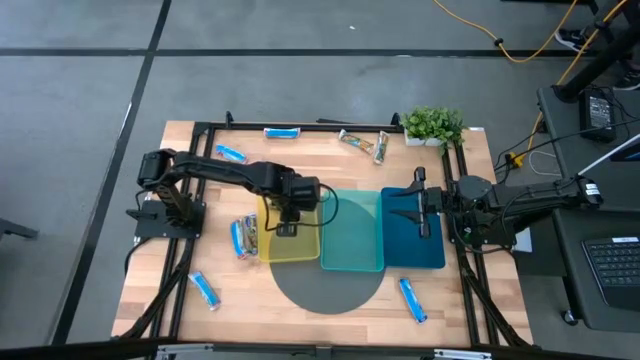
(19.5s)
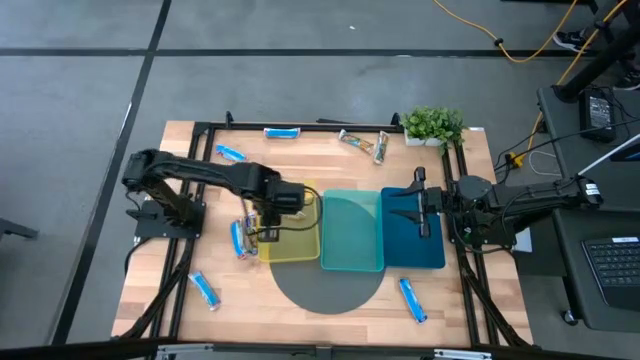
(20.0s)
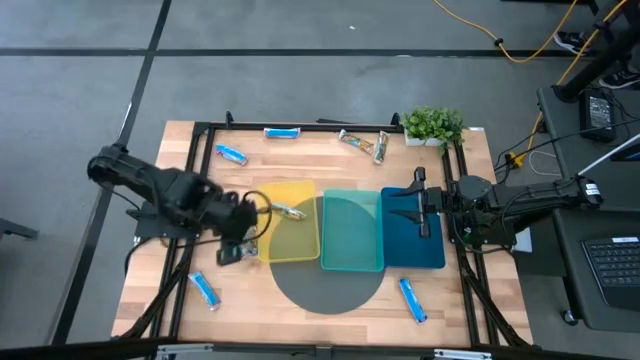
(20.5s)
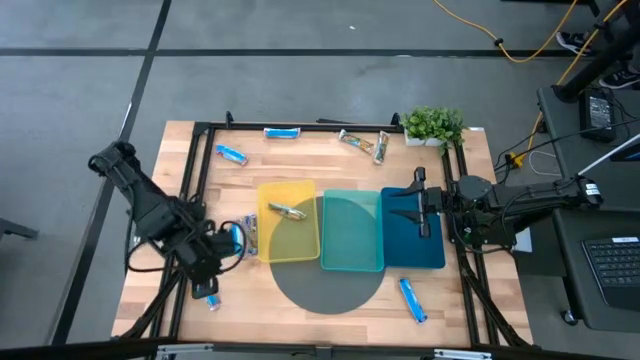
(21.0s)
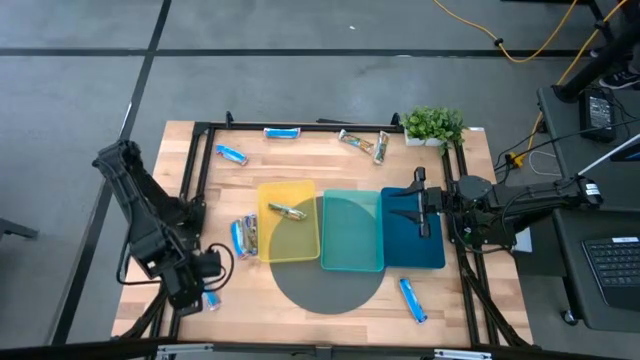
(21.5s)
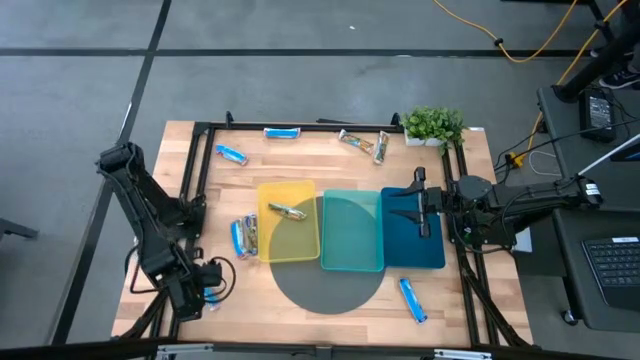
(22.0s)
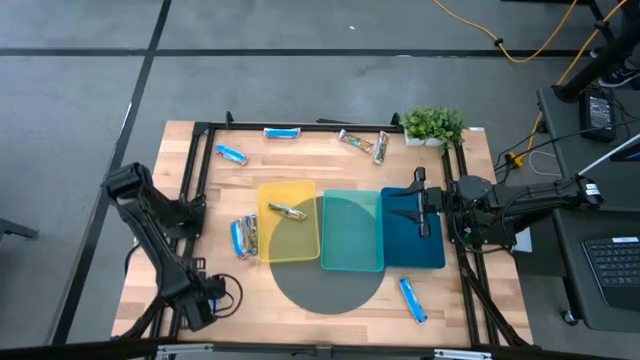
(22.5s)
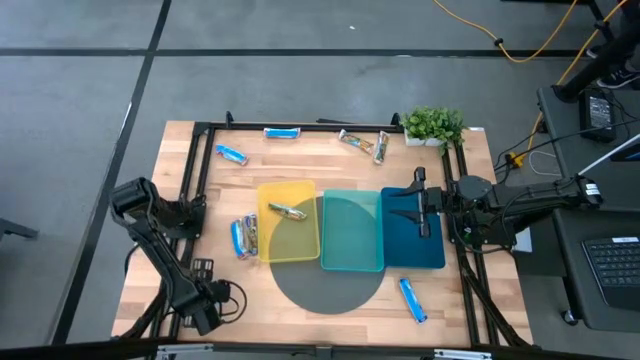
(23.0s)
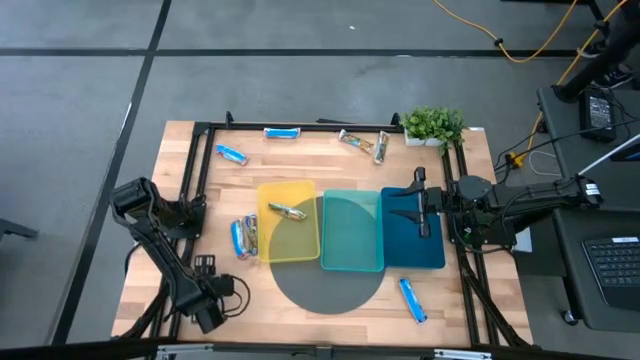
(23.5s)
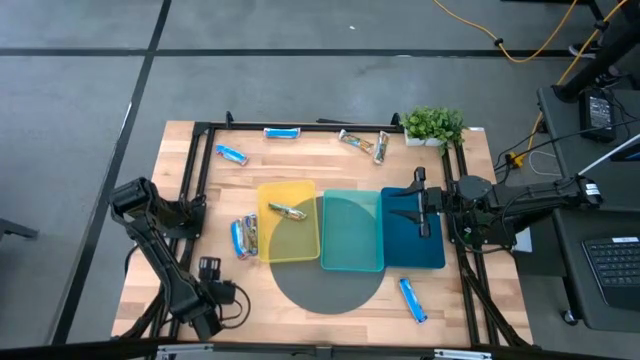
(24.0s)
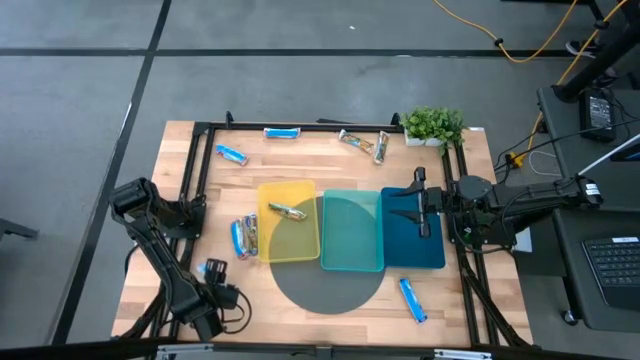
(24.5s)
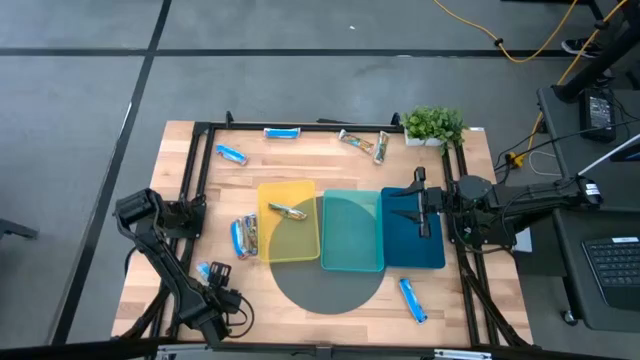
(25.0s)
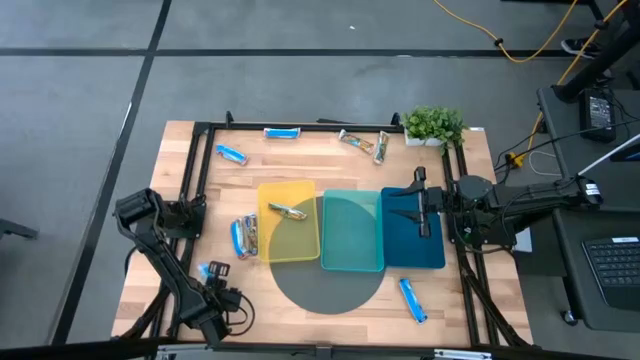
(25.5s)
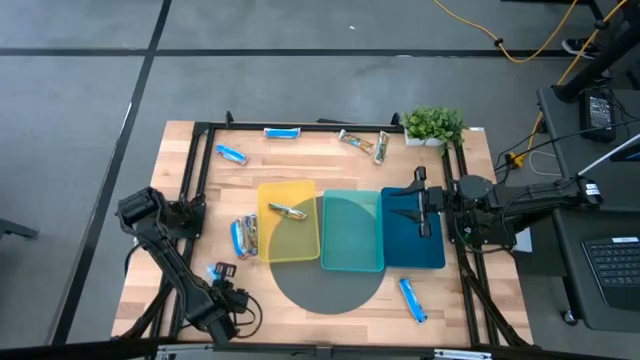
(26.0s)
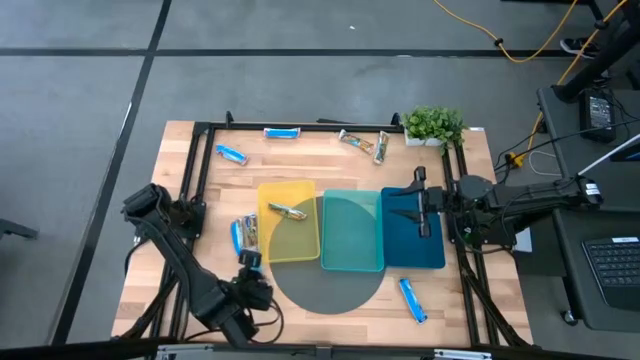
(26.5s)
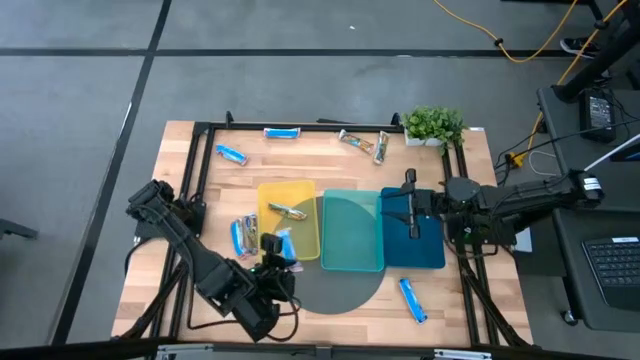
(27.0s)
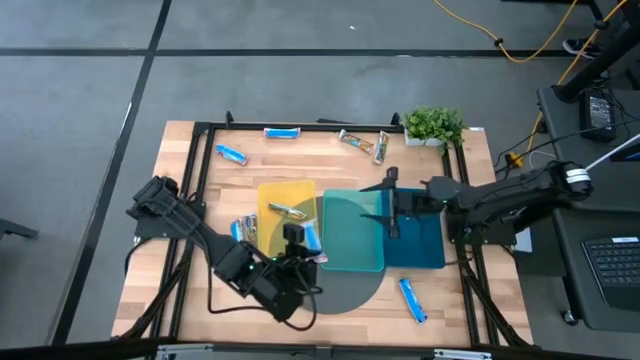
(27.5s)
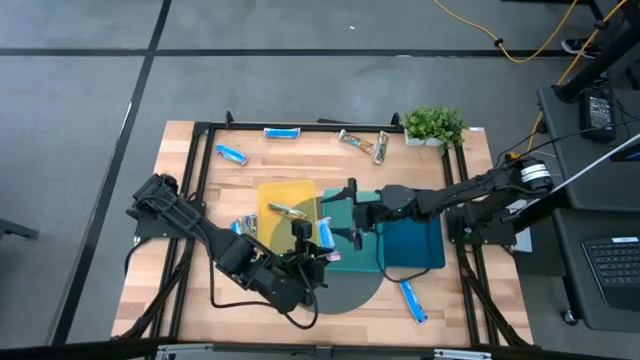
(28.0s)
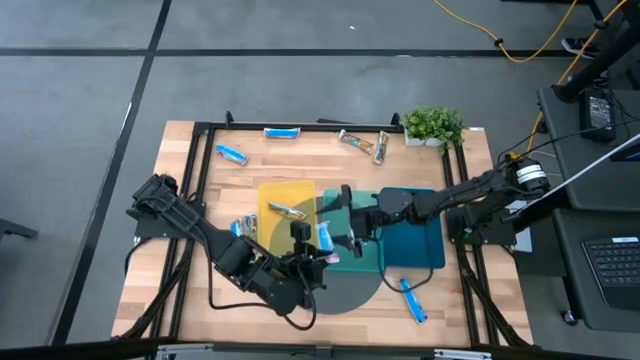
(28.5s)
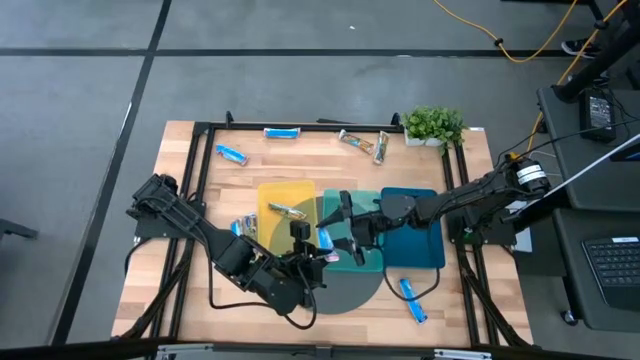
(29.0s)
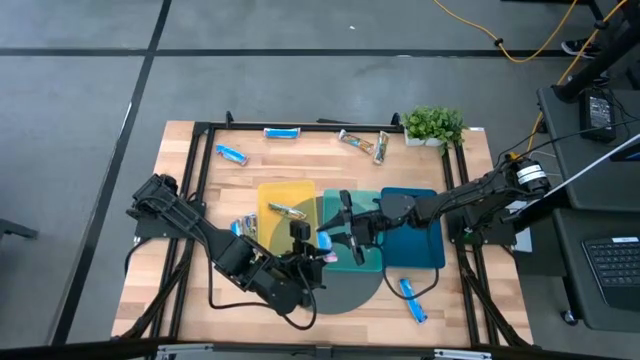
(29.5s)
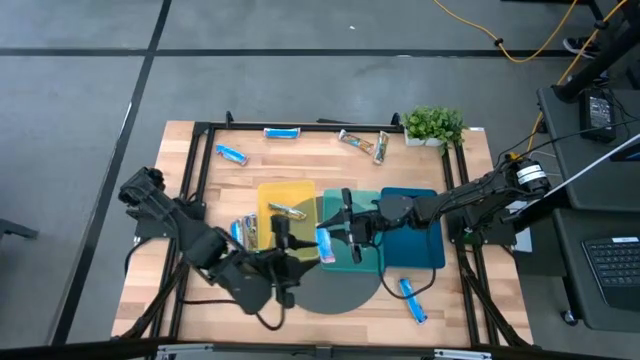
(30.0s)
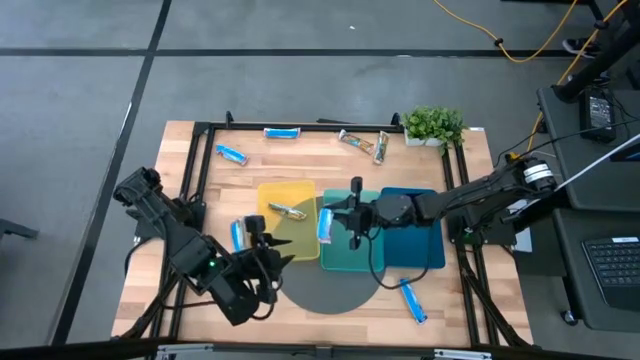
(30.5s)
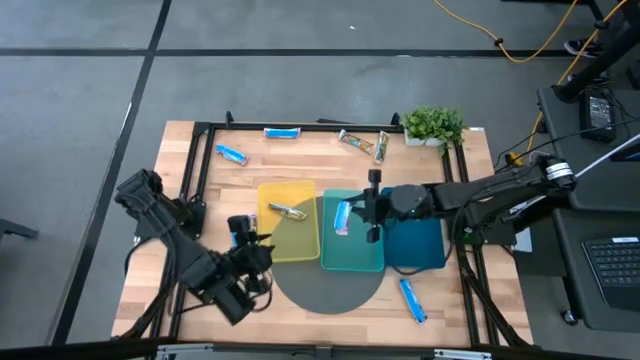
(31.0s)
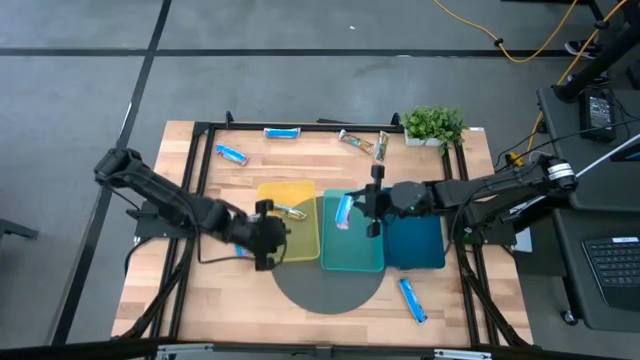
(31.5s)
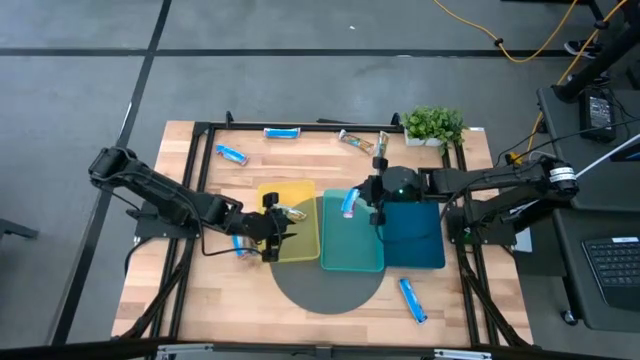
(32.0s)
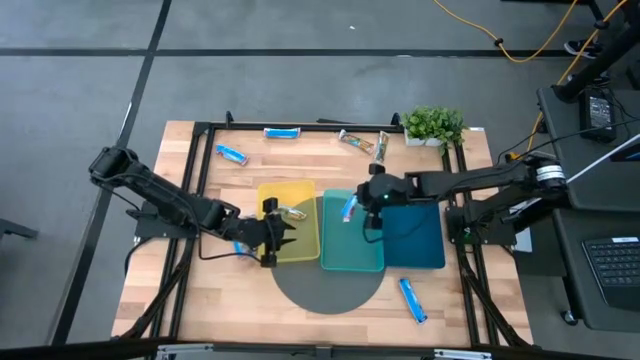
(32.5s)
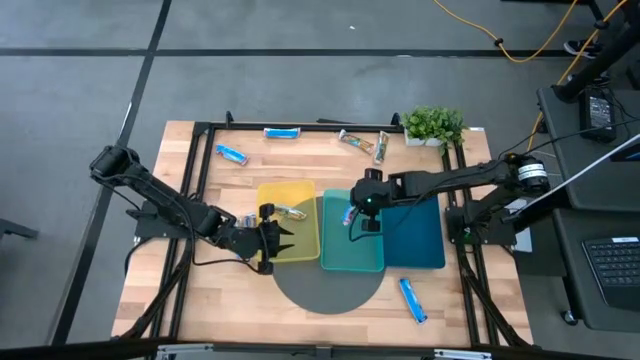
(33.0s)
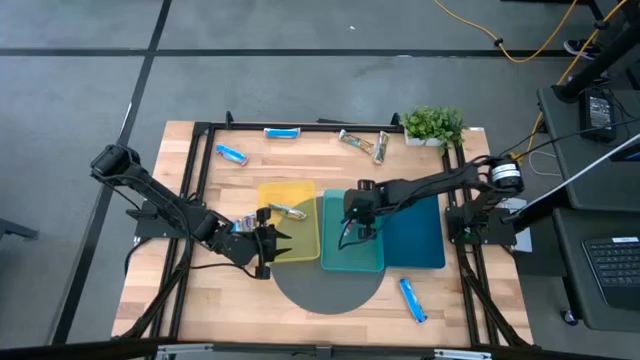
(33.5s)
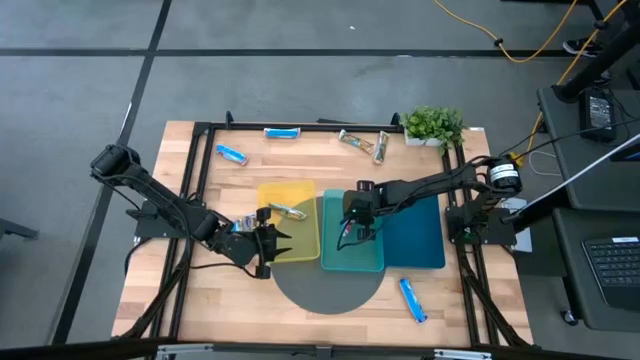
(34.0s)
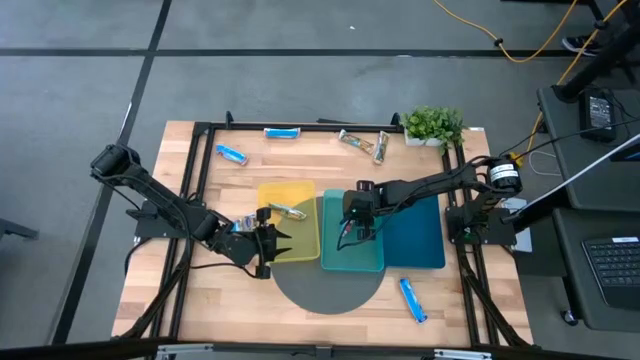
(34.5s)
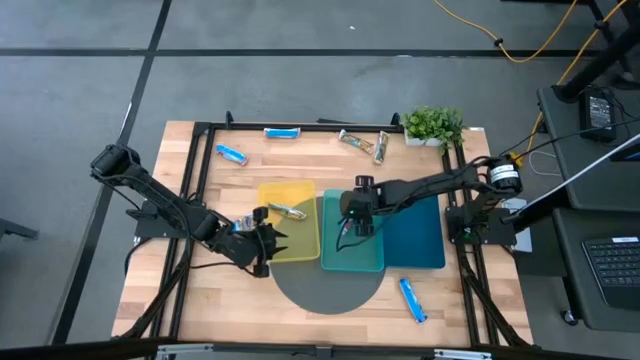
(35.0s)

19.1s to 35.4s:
Task: Pick and place Granola Bars by type
Put the red granola bar into the green bin

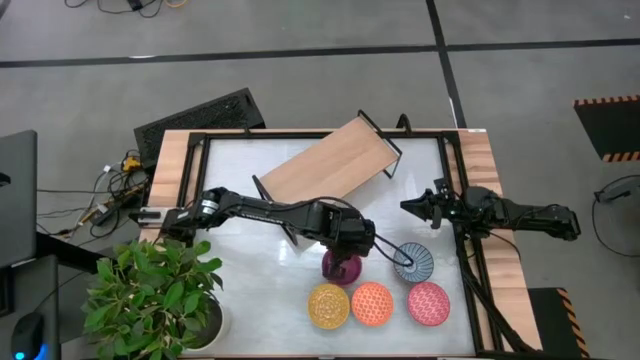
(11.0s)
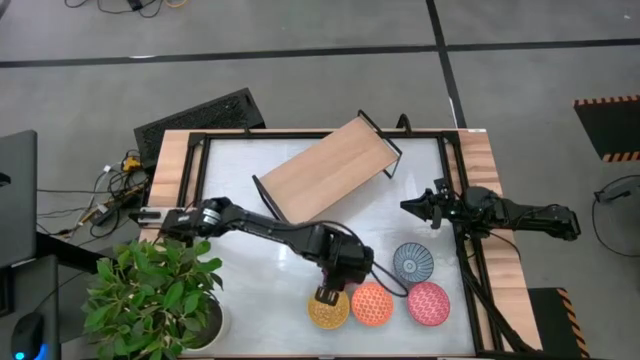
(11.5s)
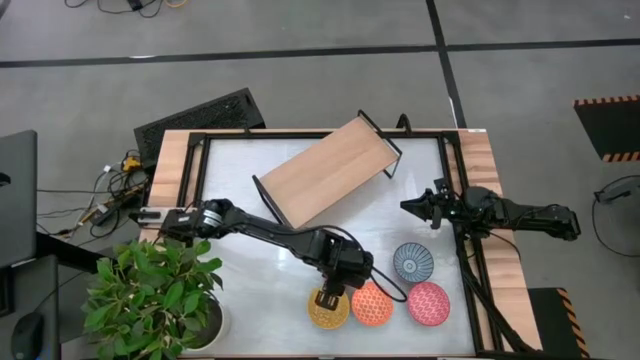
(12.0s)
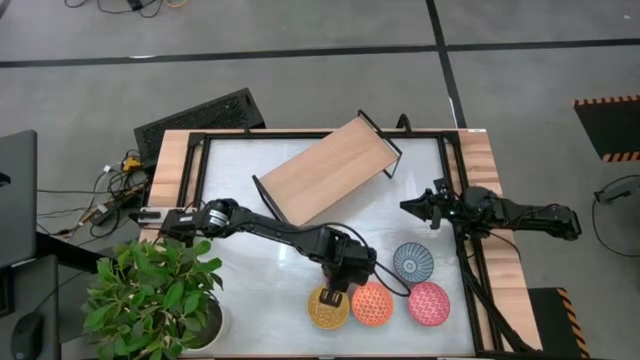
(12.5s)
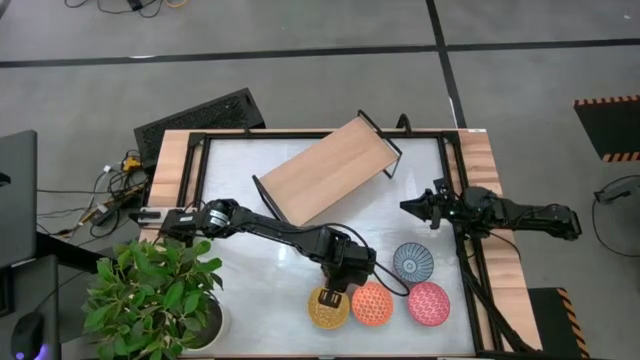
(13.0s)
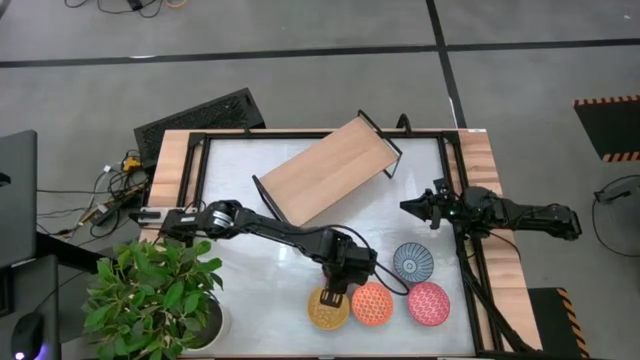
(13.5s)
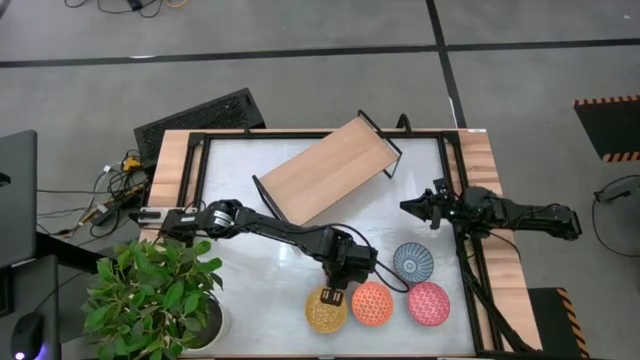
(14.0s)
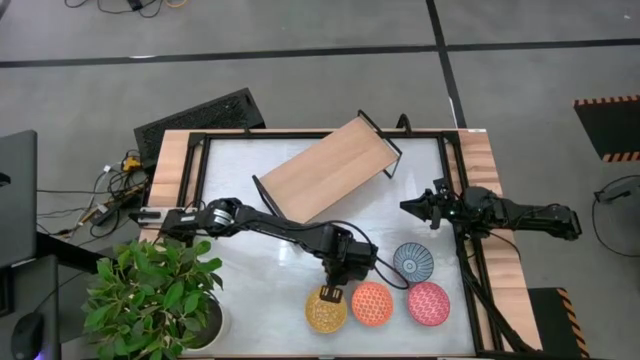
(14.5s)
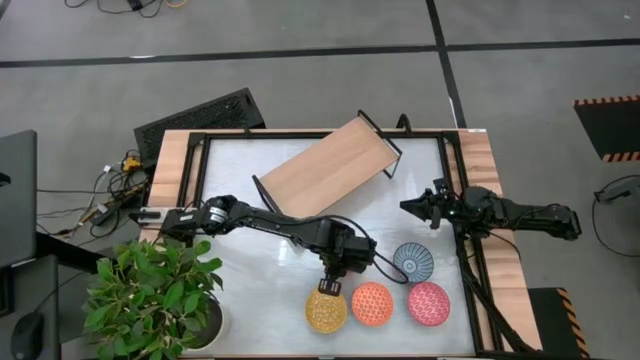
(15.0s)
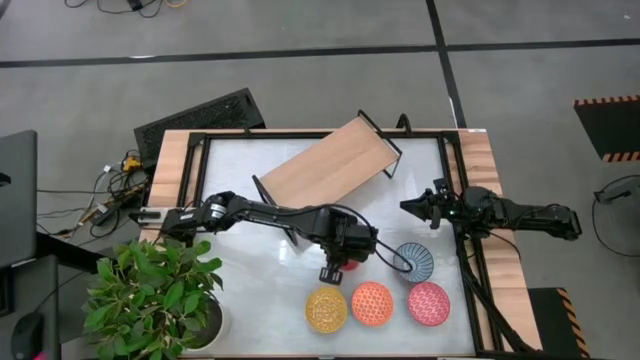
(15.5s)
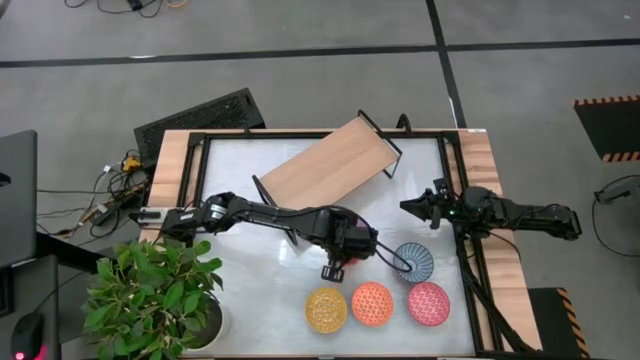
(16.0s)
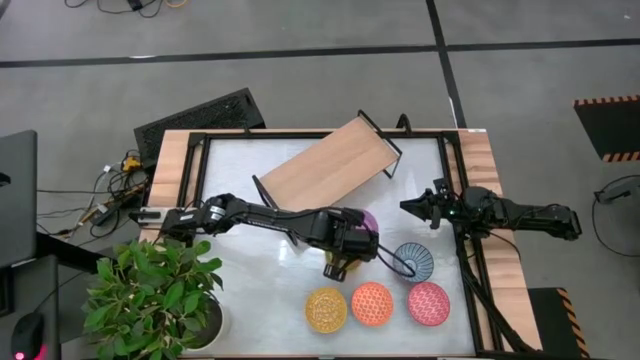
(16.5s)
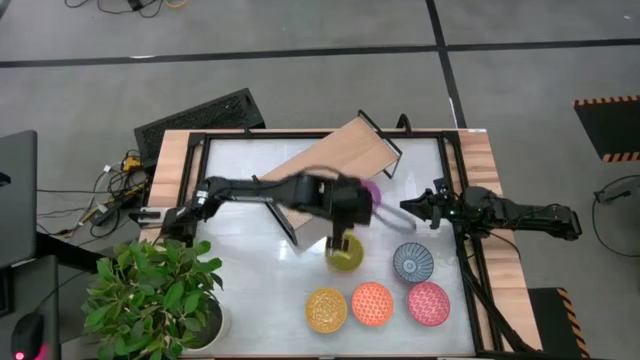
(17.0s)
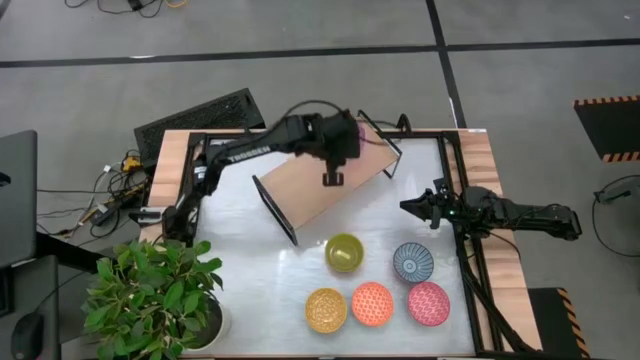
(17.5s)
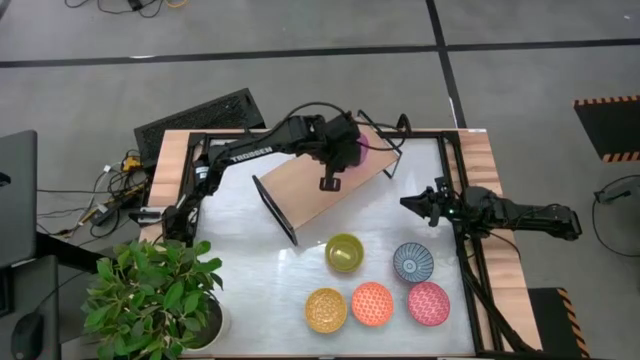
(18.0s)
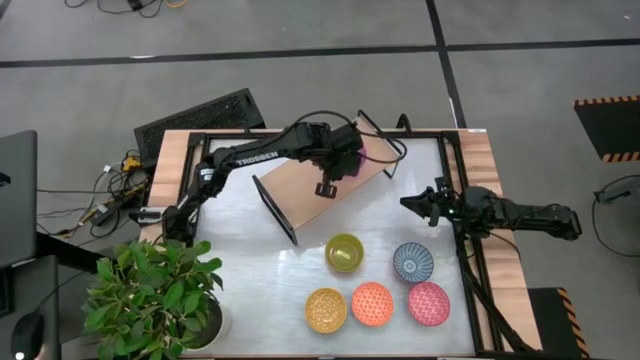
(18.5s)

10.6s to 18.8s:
Task: Place and stack bowls onto a shelf
Put the purple bowl on the shelf
